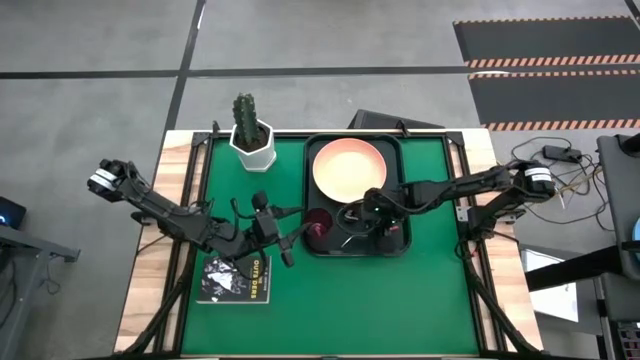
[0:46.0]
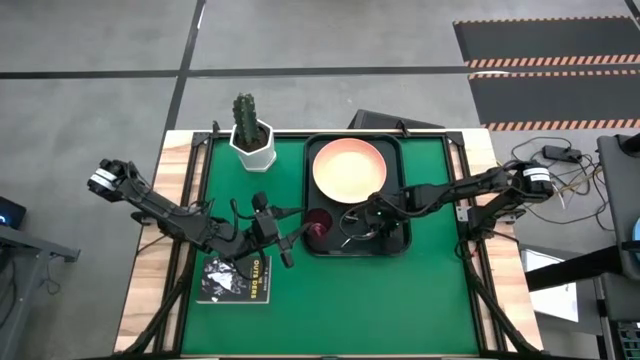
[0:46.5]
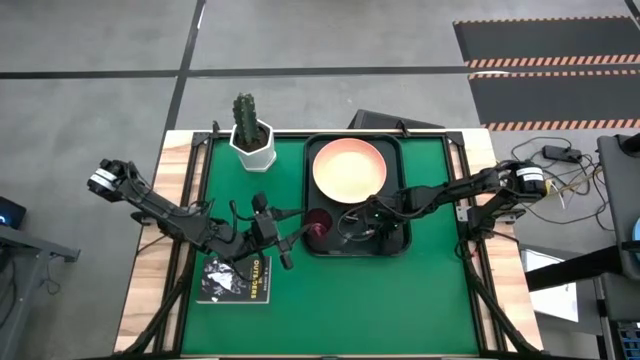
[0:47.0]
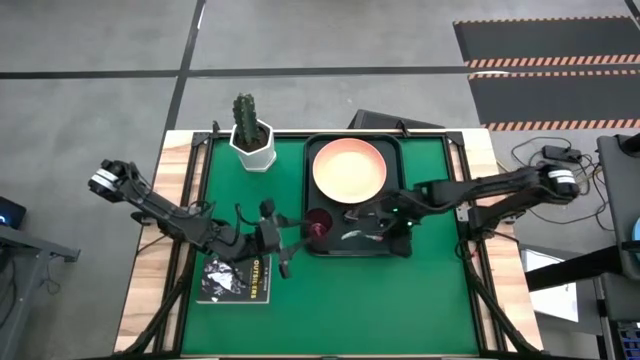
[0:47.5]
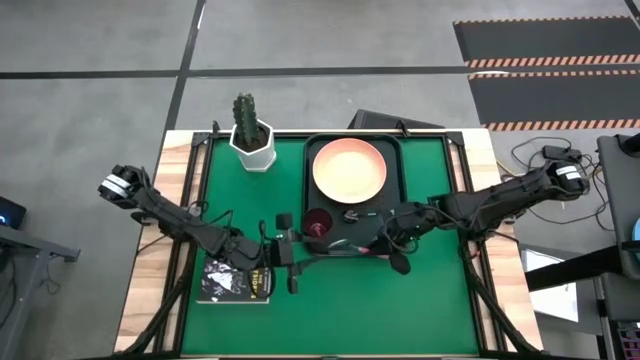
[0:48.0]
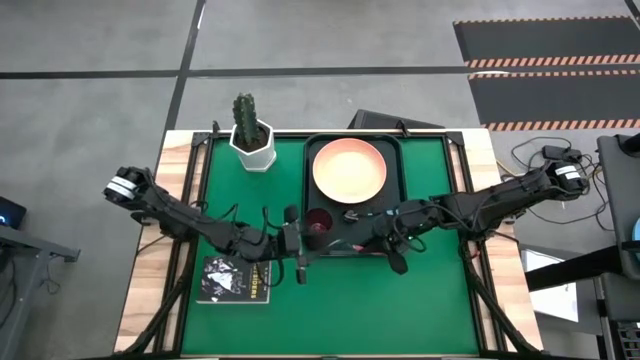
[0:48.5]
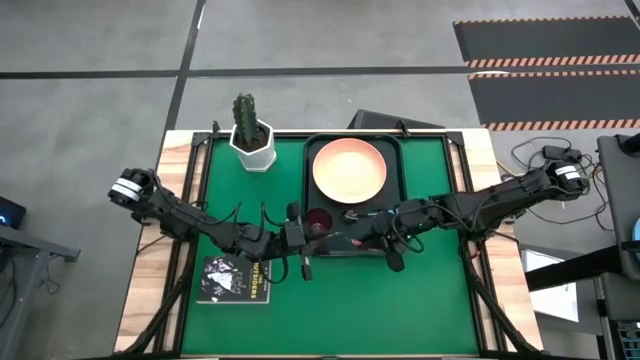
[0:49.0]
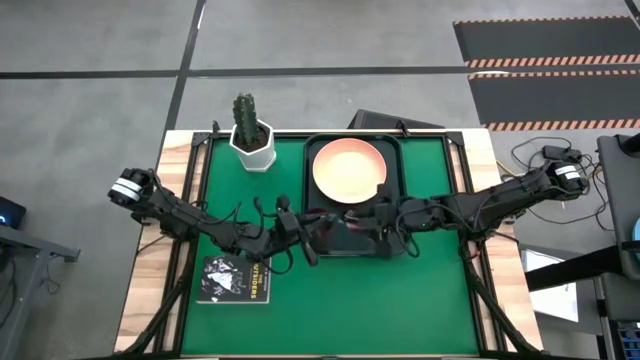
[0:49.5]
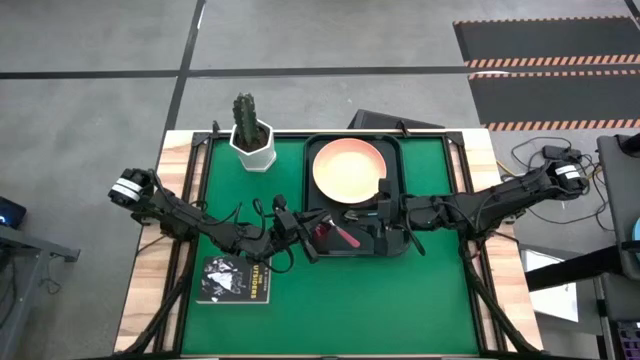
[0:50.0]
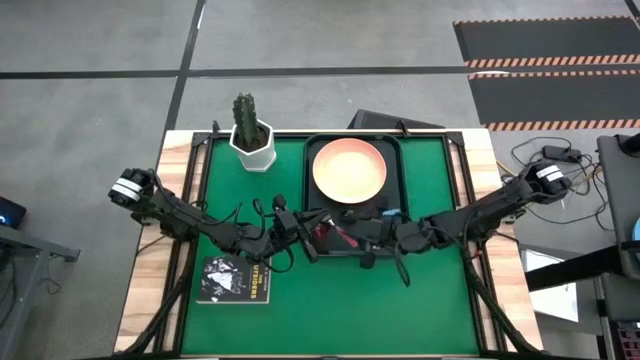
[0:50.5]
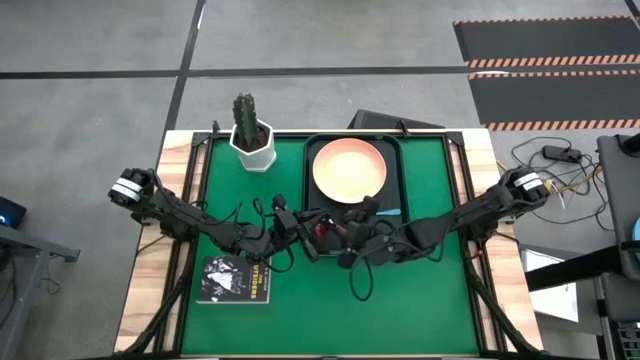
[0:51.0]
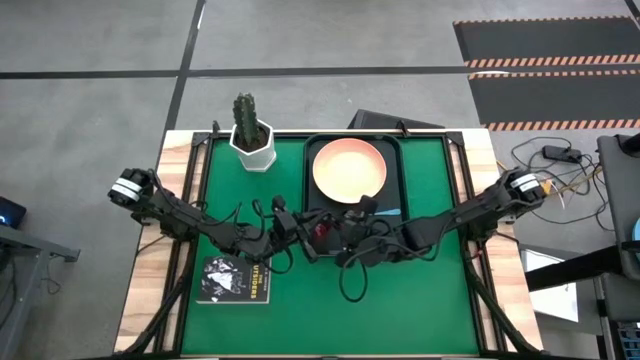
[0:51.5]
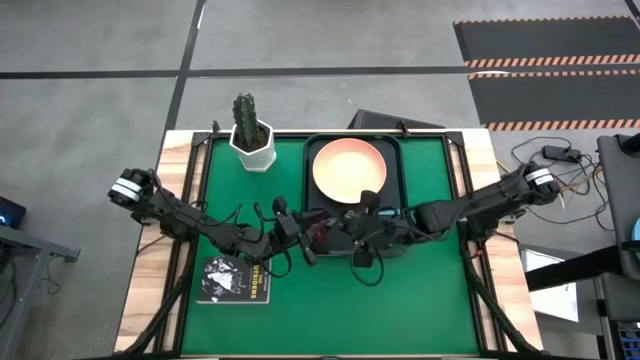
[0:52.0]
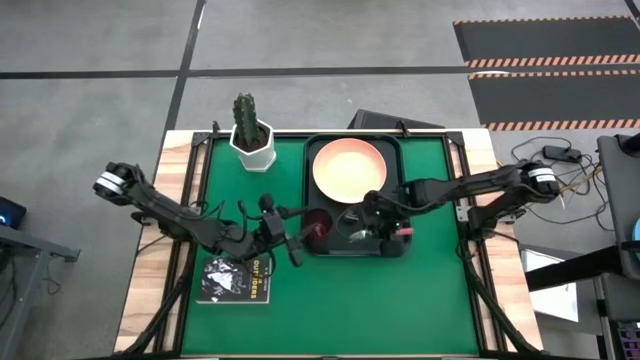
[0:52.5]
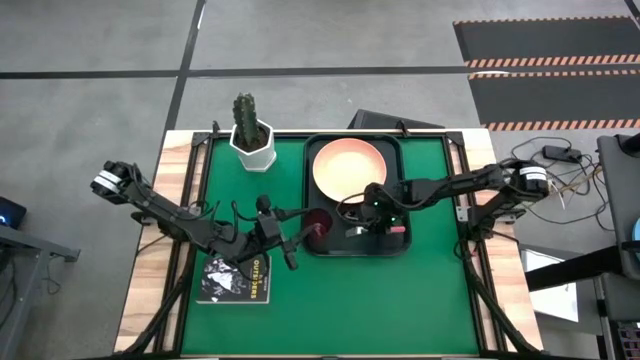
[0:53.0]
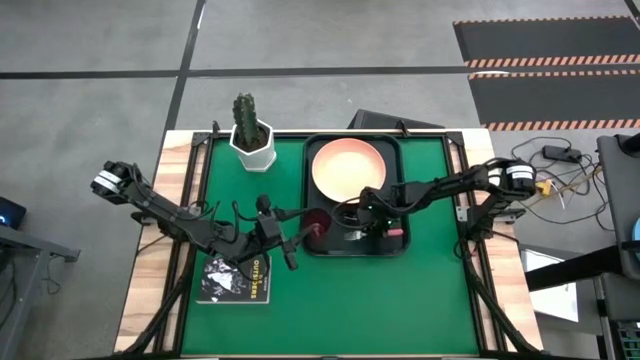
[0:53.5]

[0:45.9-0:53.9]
Task: Pick and place plate/cup/fork/spoon on tray
Put the pink fork on the black serving tray to the left of the blue spoon

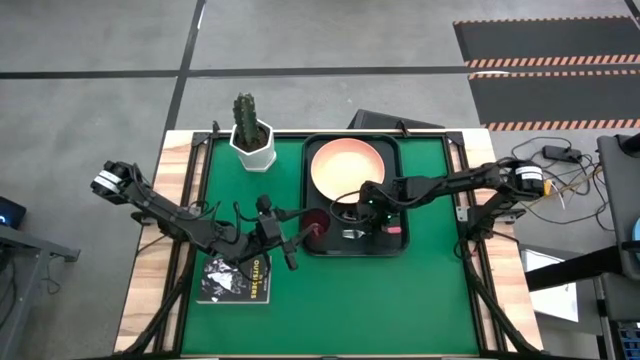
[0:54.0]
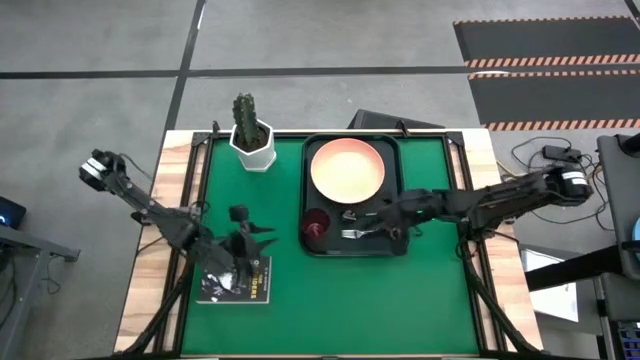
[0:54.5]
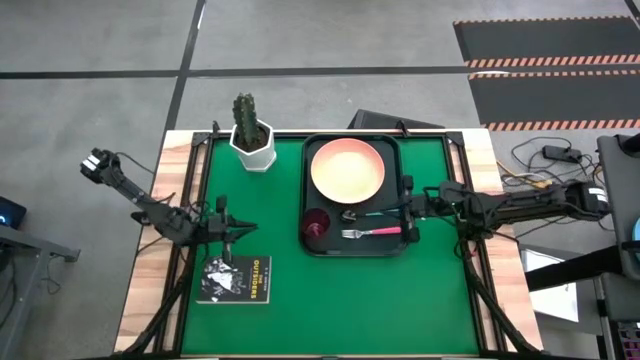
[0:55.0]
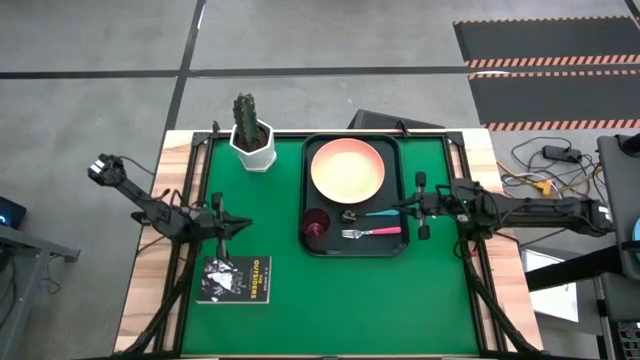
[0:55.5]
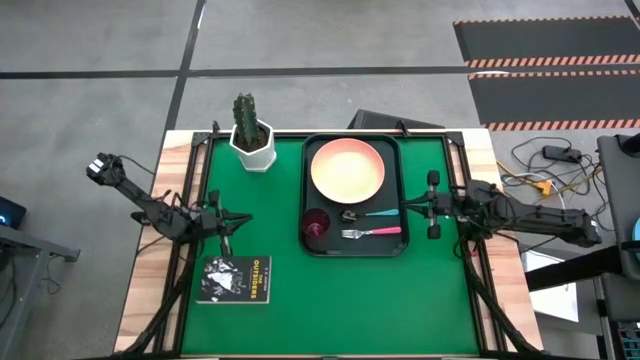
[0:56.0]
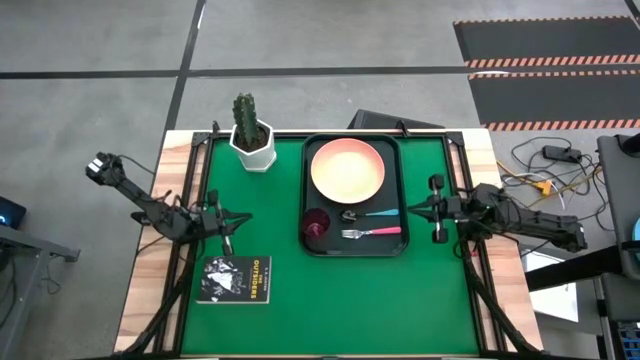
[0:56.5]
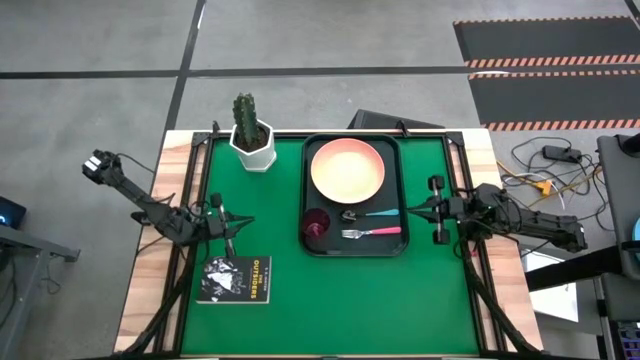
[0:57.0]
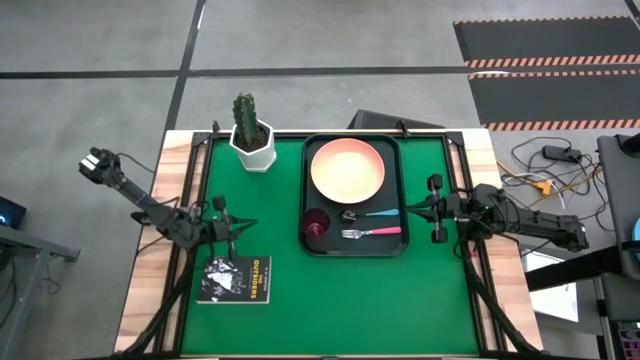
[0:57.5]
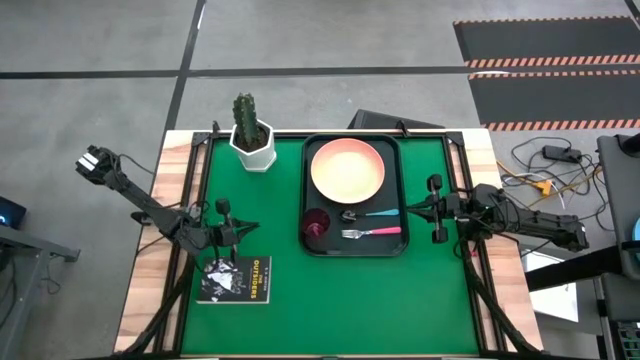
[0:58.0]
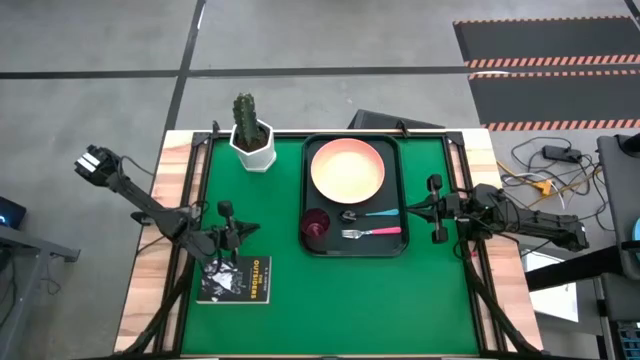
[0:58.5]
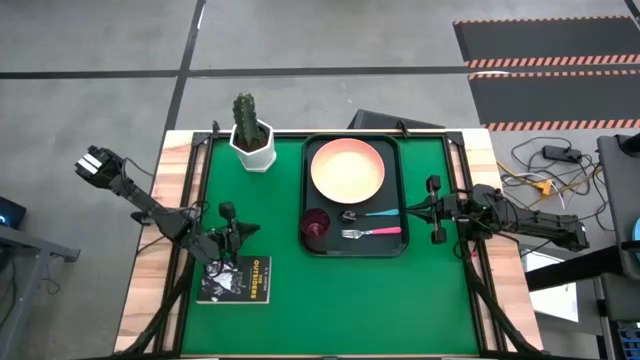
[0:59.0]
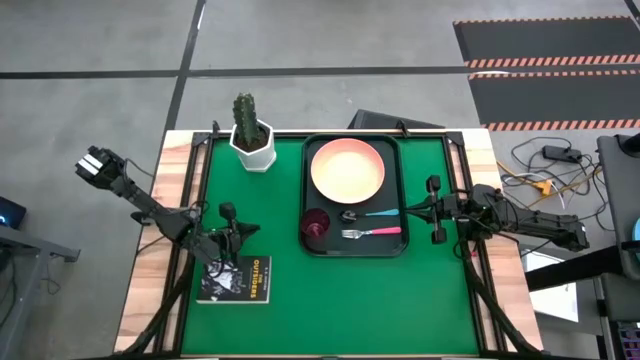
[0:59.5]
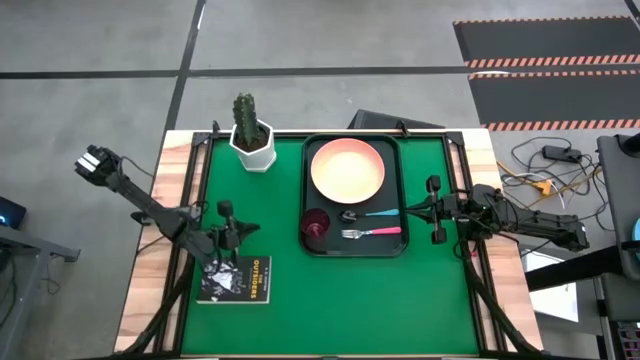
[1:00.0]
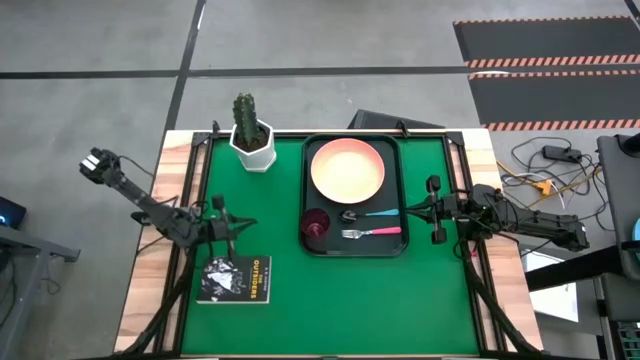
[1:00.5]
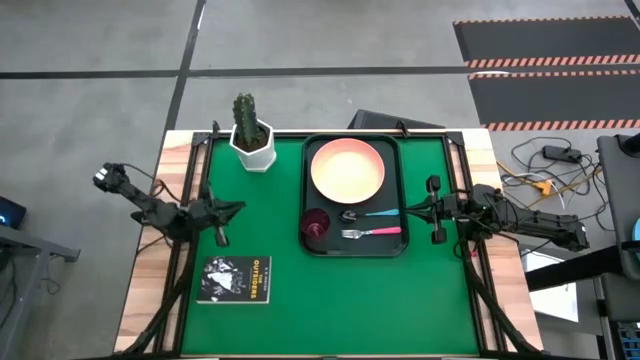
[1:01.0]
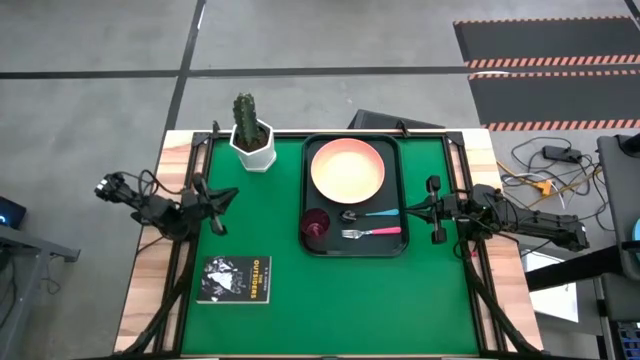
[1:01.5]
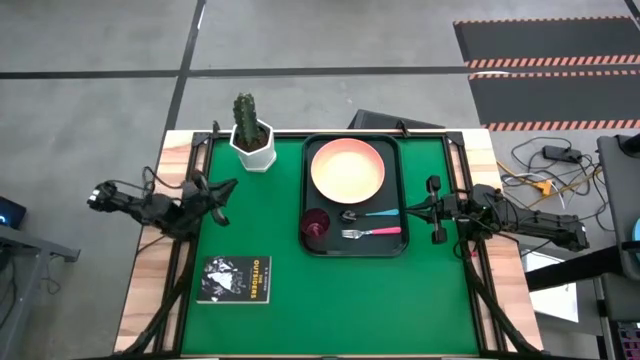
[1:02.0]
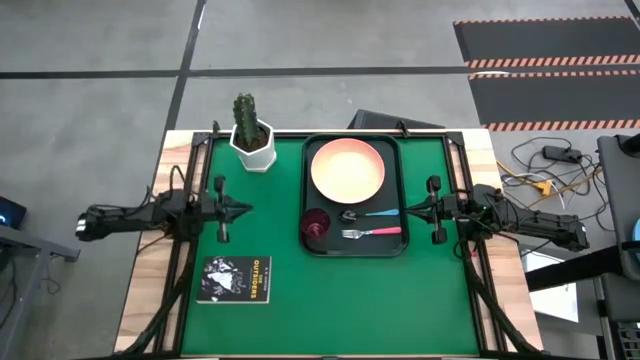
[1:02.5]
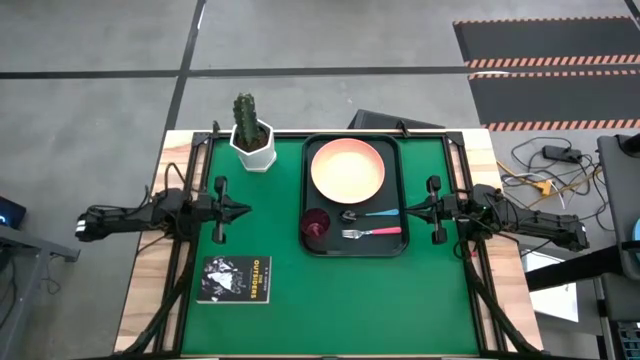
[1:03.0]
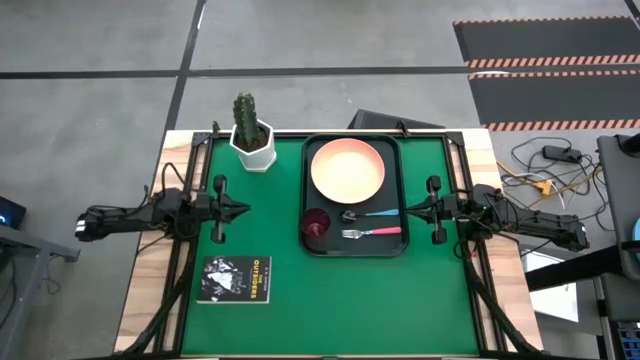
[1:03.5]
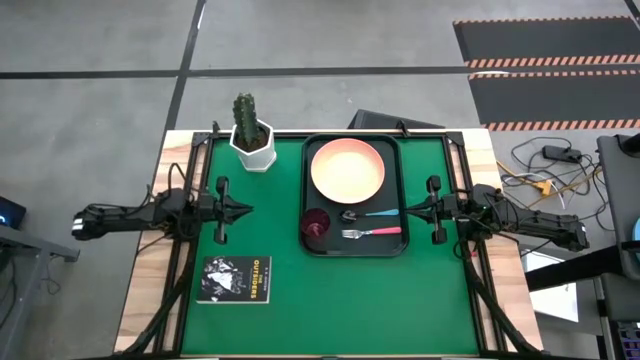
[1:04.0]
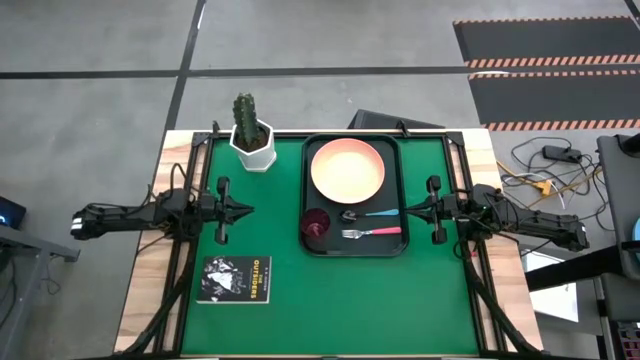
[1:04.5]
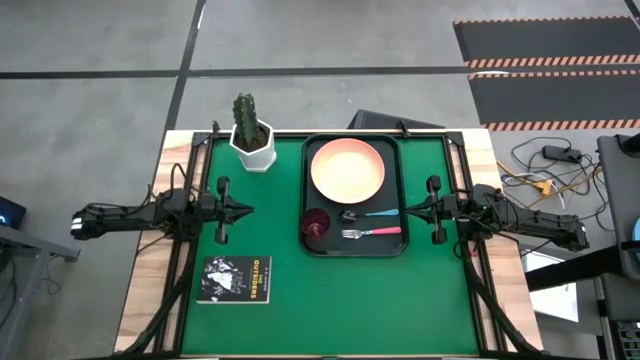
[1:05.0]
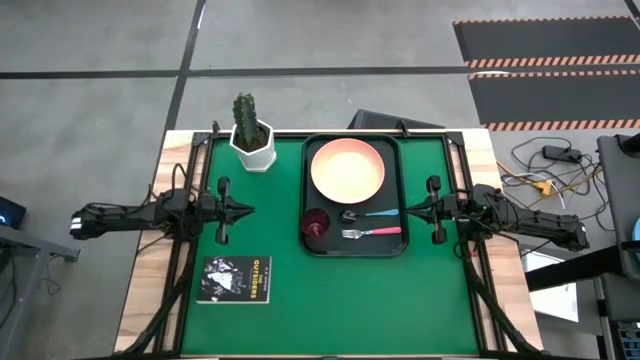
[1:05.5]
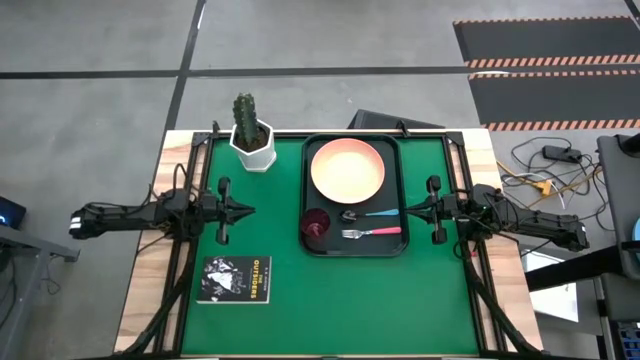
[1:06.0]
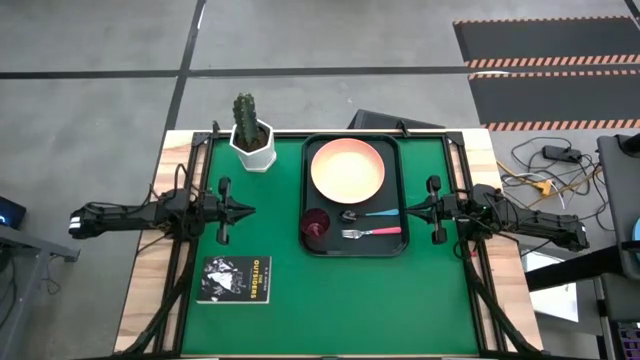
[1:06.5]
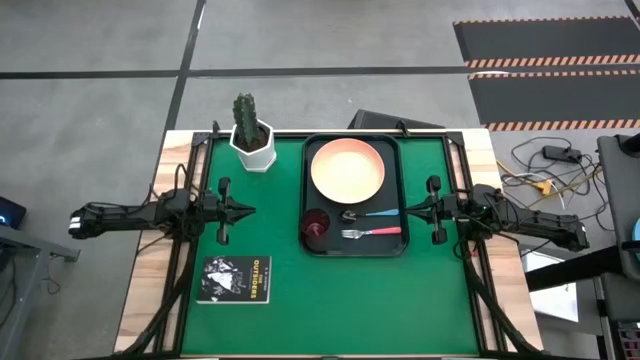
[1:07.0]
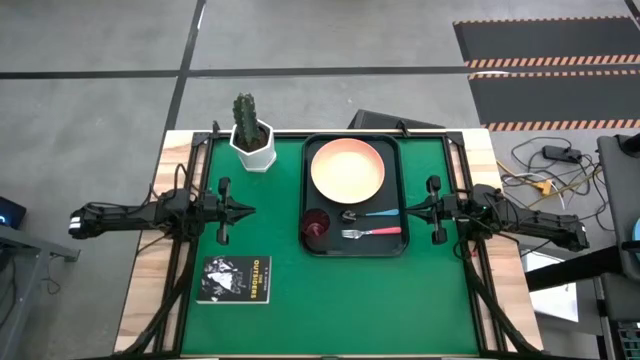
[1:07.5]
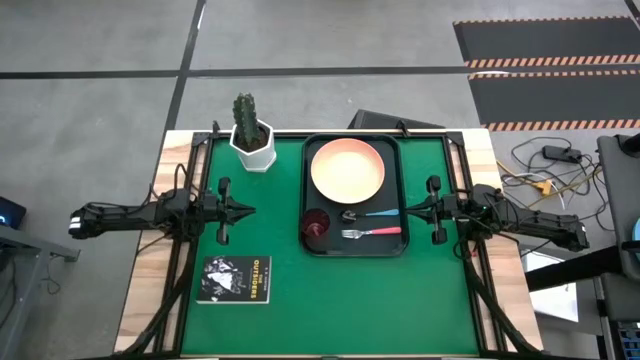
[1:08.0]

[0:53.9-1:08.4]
Return to Home Position

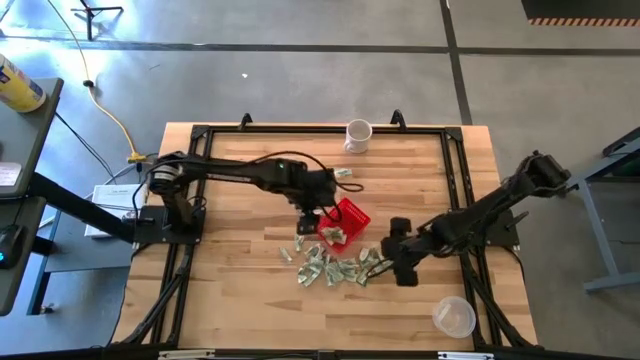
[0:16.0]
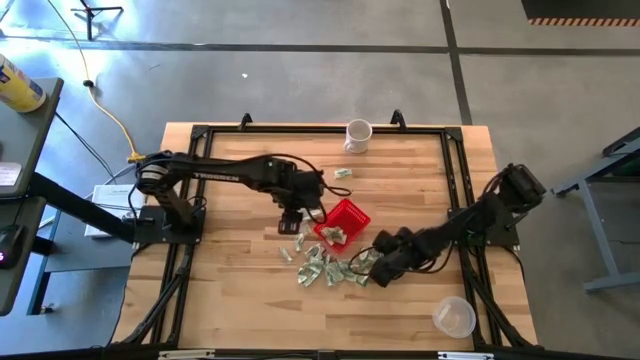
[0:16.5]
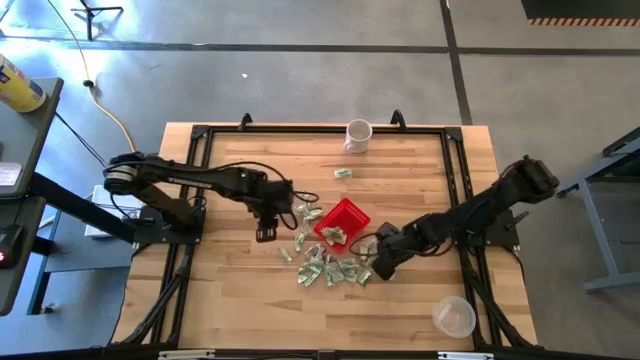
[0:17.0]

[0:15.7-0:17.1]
Task: Pick and place items into bin
Put the white stevia packet into the red bin
